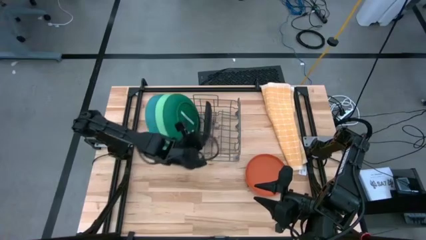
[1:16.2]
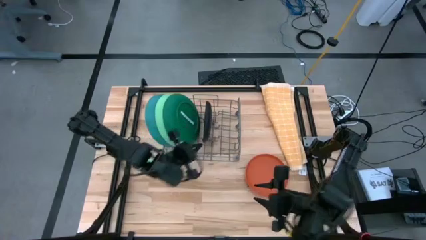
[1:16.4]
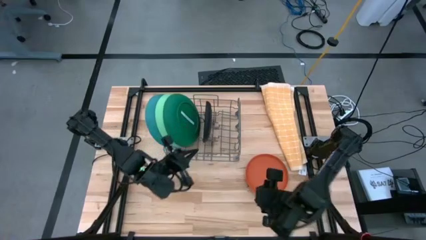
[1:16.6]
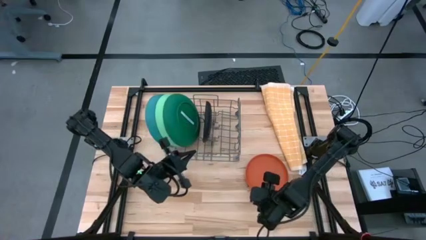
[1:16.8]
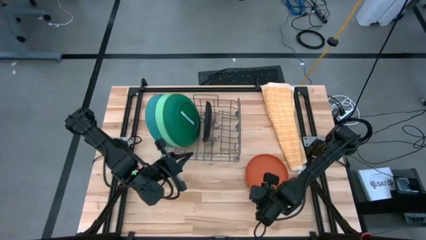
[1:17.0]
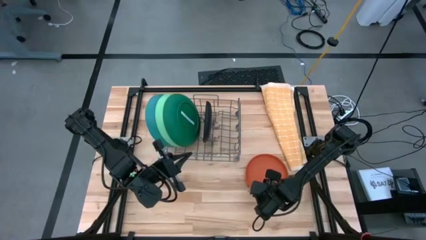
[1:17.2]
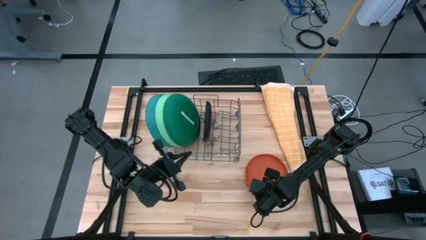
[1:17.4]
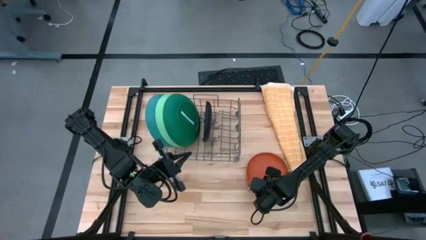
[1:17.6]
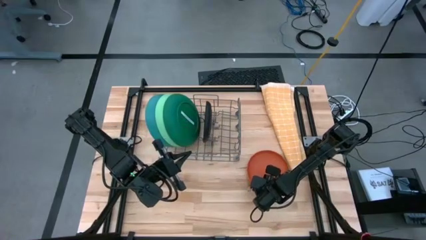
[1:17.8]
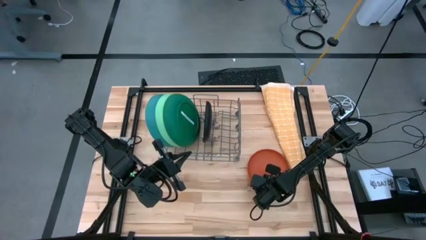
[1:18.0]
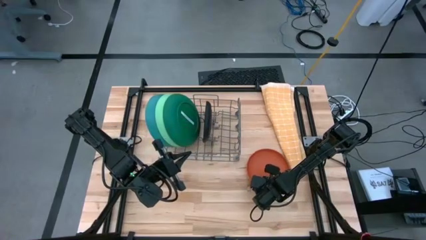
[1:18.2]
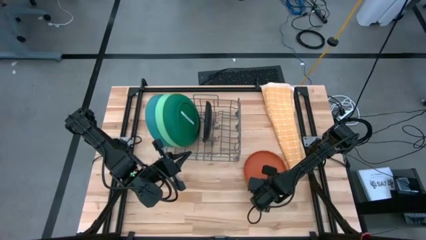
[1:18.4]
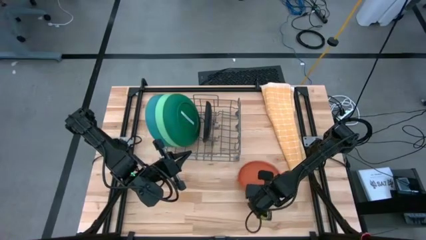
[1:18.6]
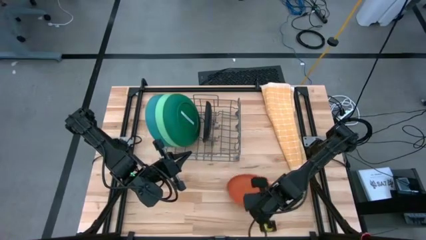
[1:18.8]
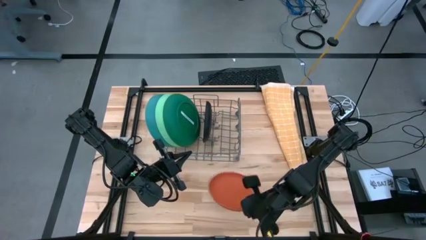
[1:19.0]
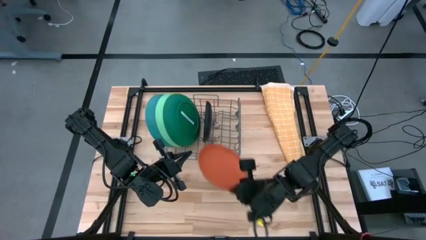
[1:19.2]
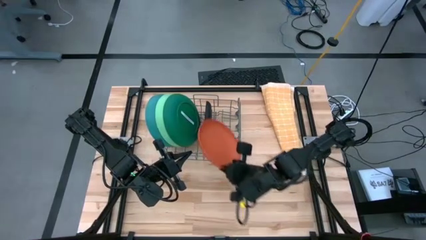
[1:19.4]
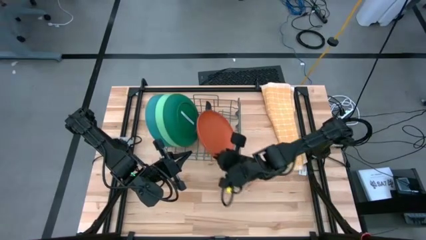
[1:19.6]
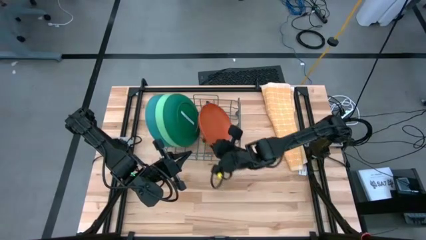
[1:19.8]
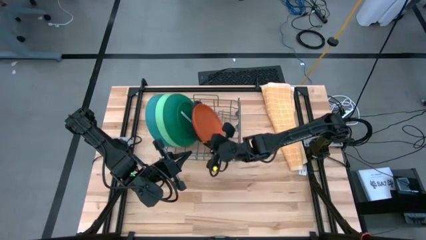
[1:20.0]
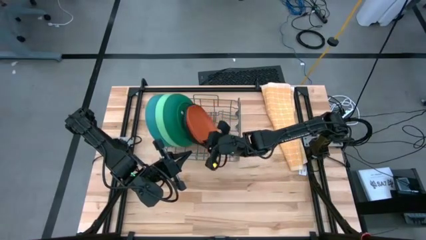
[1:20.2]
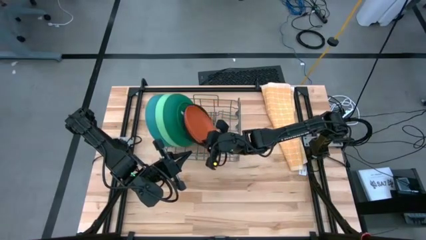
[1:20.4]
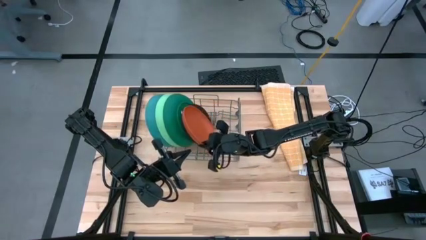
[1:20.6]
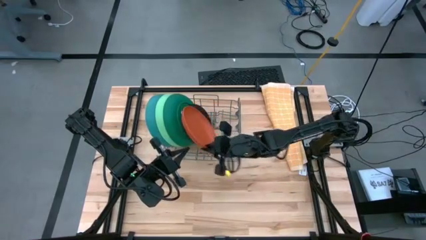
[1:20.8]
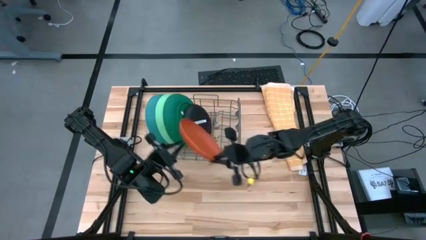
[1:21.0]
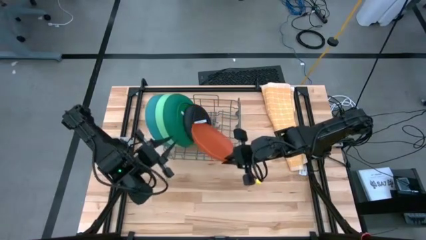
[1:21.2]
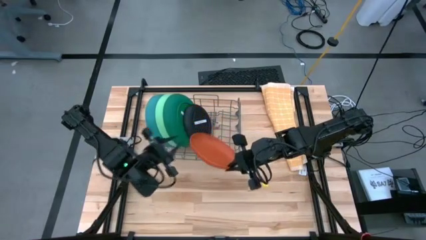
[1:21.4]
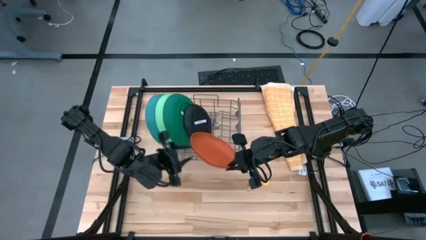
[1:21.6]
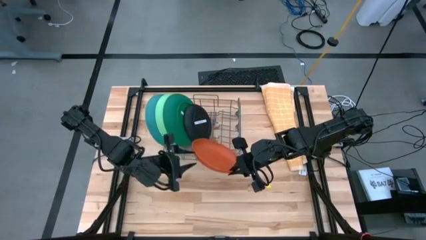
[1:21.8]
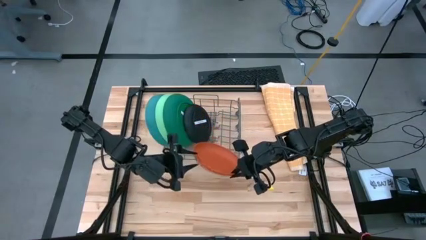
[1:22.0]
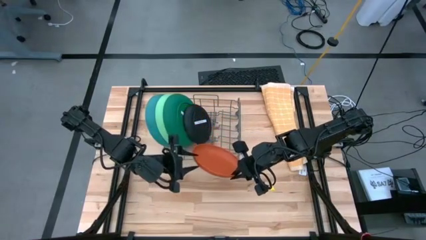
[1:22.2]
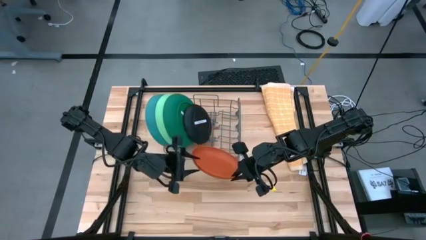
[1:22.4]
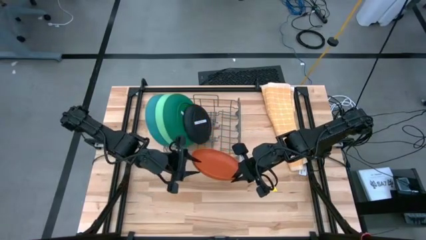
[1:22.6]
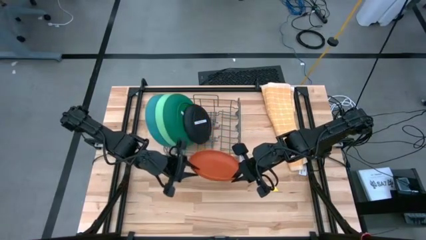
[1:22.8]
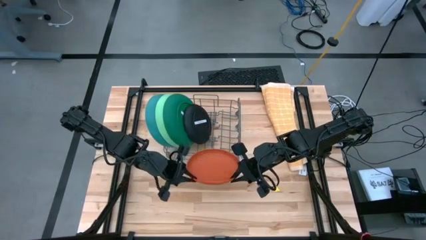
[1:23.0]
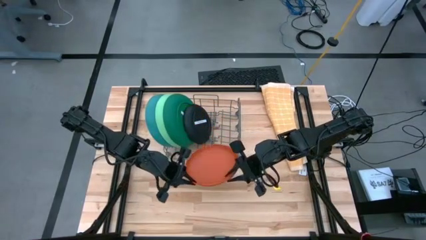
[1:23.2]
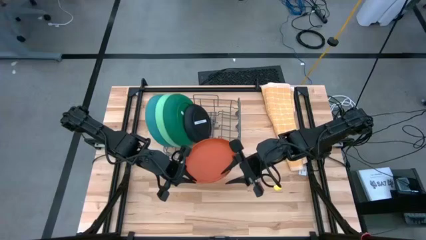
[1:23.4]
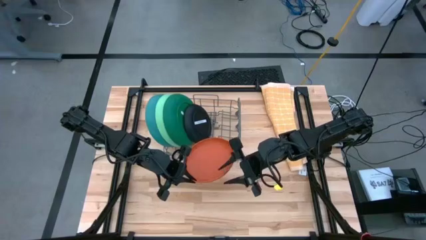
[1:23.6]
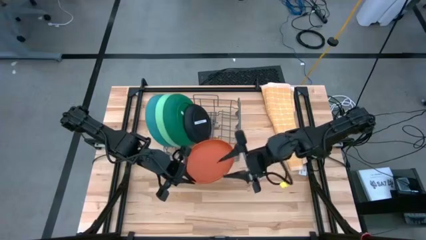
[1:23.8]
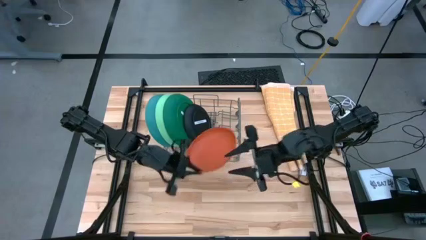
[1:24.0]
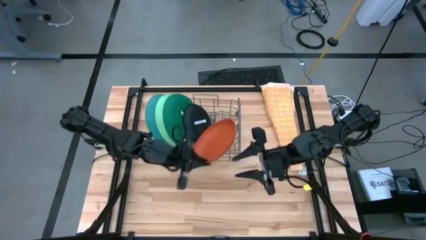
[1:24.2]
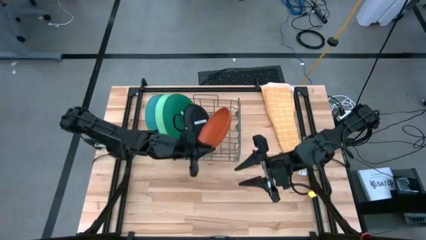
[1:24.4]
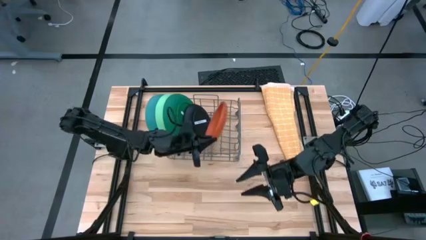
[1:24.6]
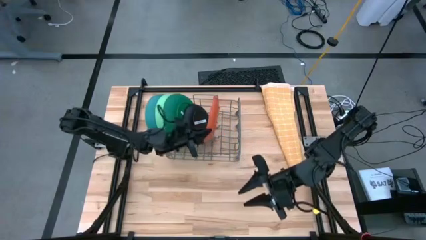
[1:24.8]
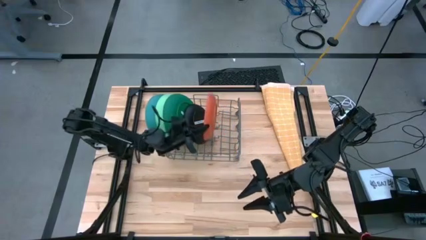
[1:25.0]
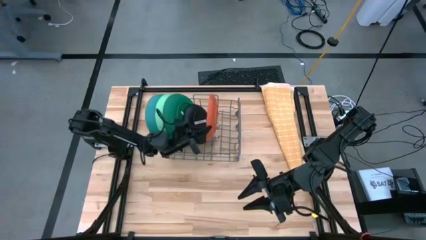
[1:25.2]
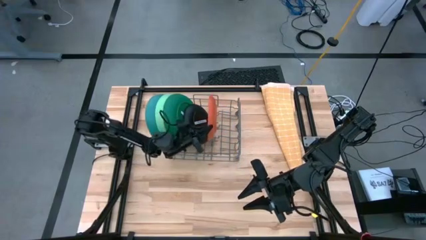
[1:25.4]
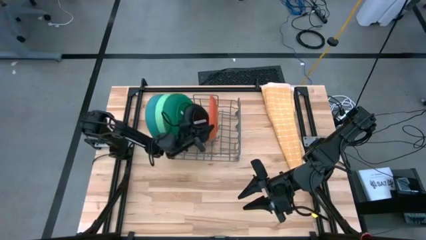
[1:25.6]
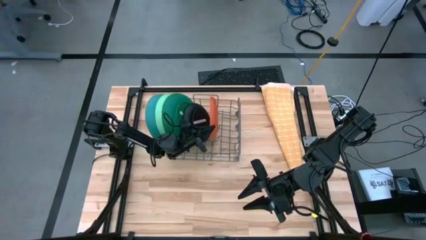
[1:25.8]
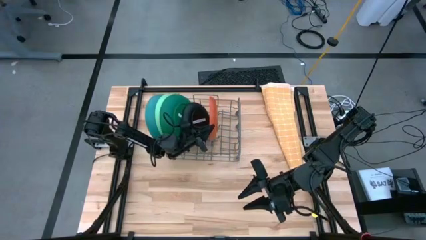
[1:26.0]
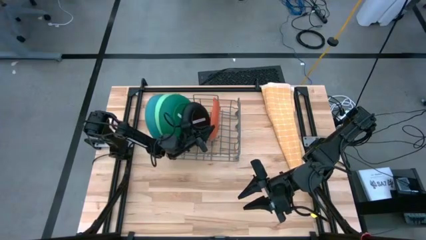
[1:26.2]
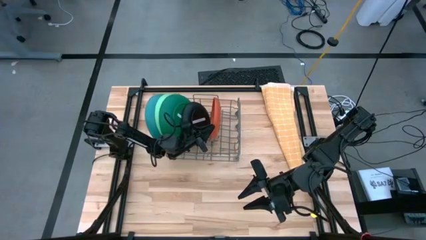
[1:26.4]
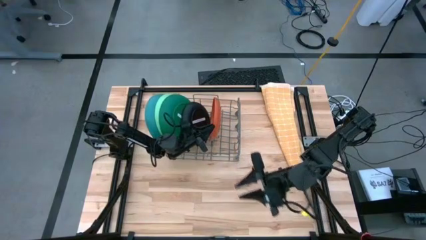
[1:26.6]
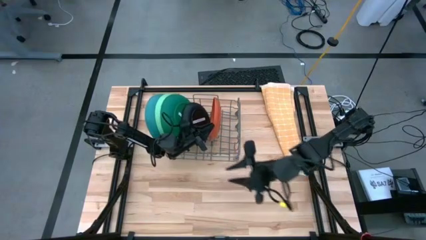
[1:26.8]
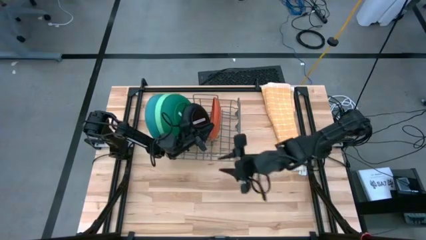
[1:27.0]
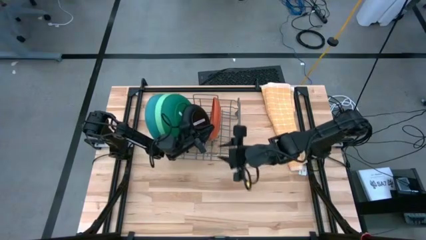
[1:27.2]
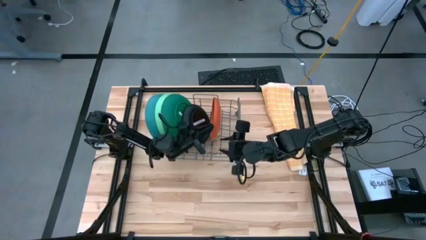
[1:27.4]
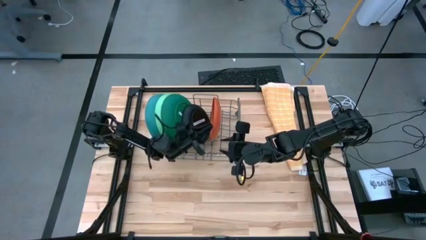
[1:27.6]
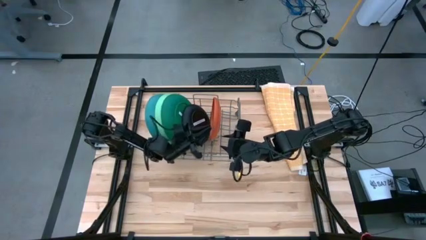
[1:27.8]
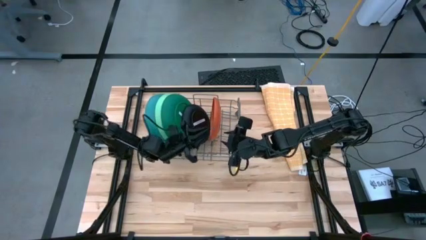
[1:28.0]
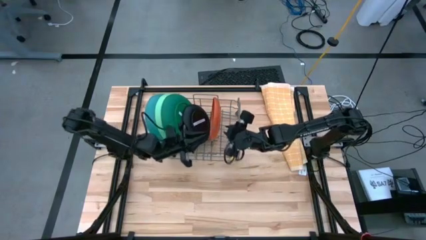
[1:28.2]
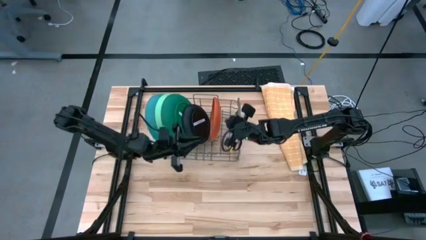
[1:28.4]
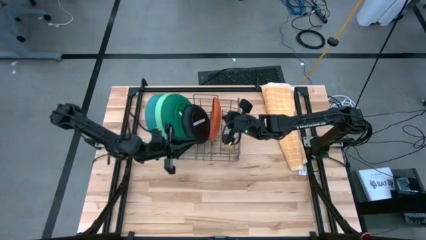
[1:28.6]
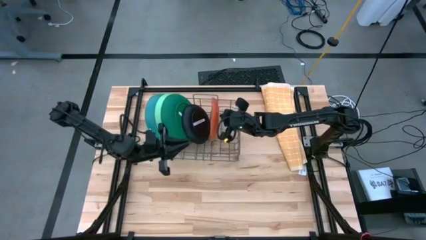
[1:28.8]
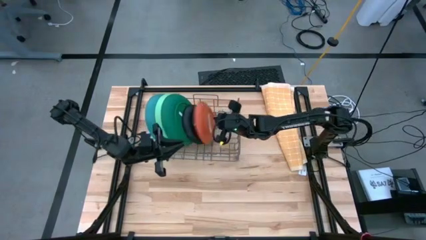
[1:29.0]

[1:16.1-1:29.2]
Task: Sort dishes
Put the orange plate into the dishwasher rack

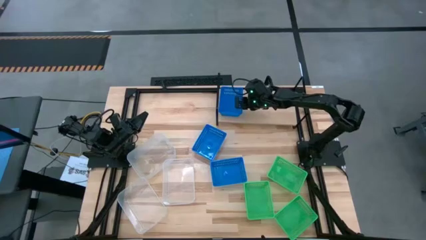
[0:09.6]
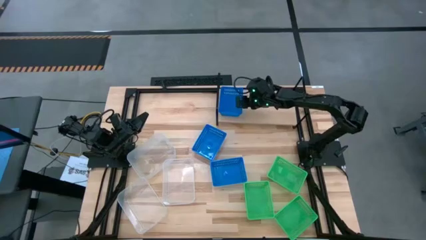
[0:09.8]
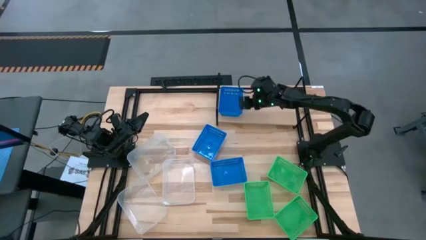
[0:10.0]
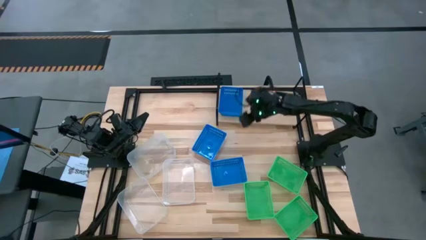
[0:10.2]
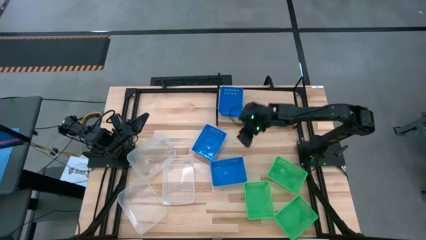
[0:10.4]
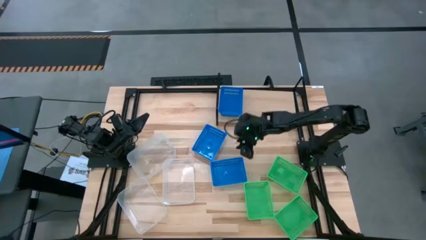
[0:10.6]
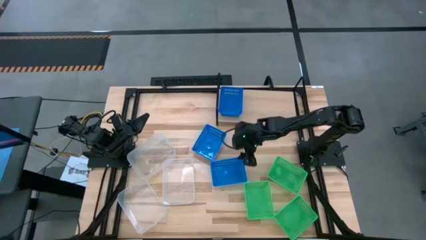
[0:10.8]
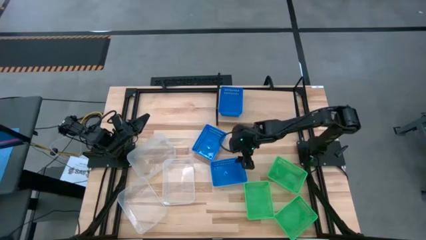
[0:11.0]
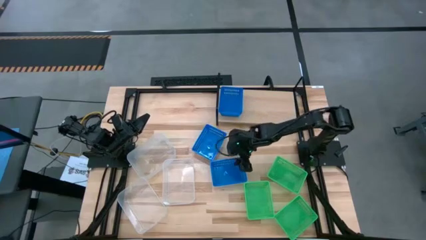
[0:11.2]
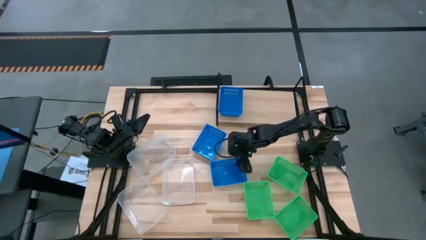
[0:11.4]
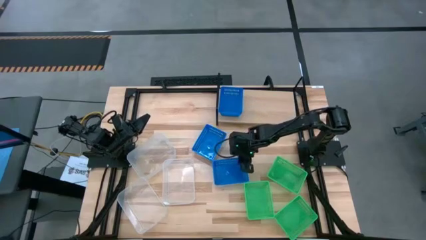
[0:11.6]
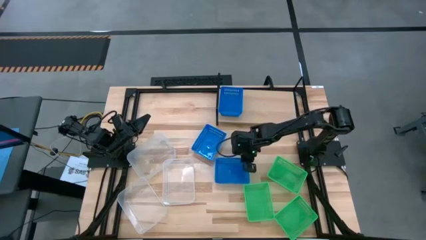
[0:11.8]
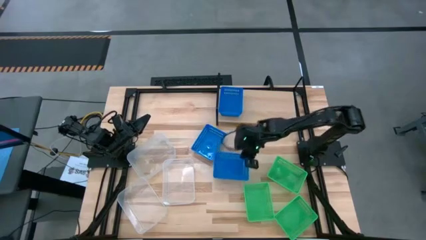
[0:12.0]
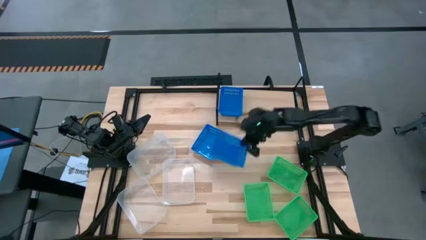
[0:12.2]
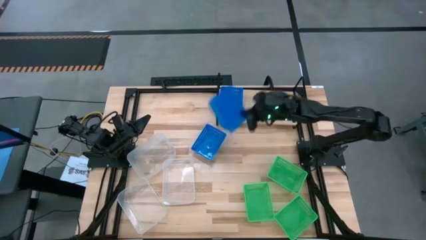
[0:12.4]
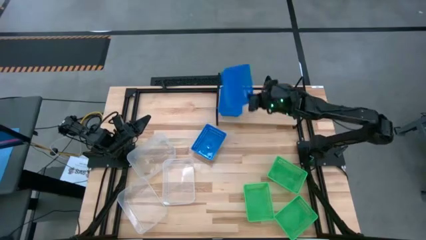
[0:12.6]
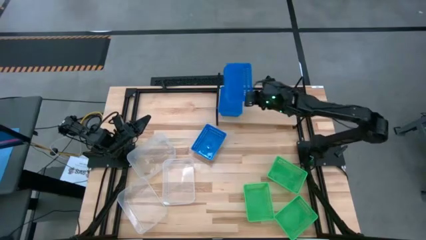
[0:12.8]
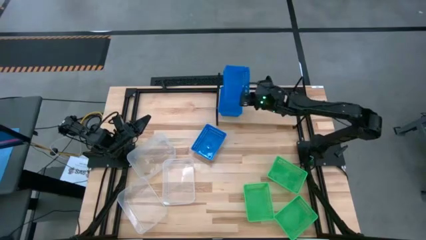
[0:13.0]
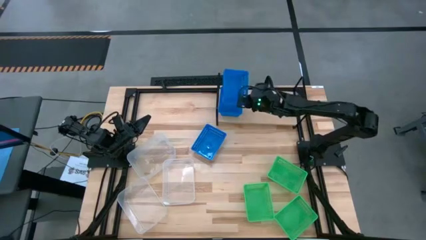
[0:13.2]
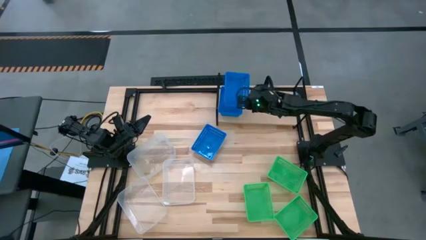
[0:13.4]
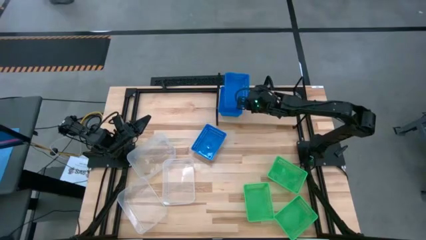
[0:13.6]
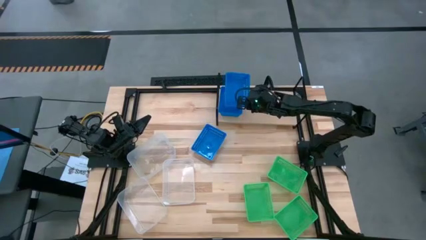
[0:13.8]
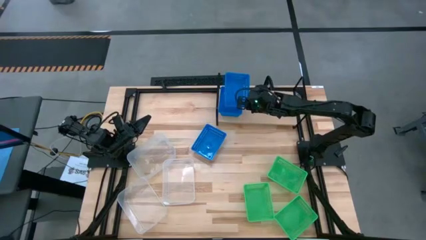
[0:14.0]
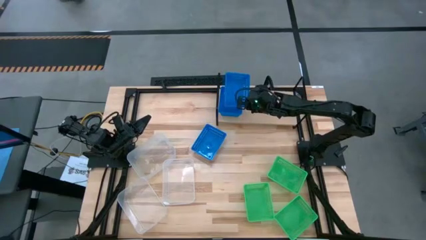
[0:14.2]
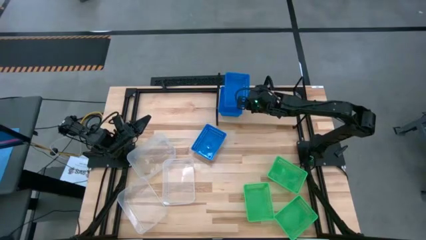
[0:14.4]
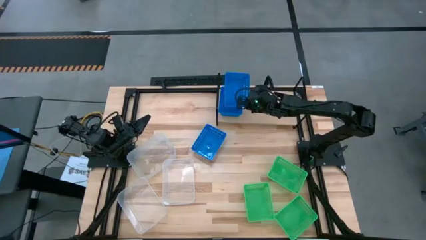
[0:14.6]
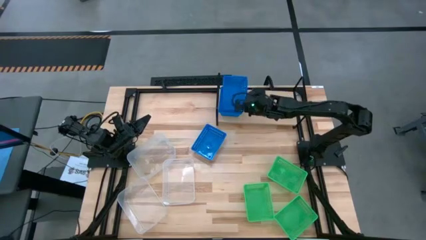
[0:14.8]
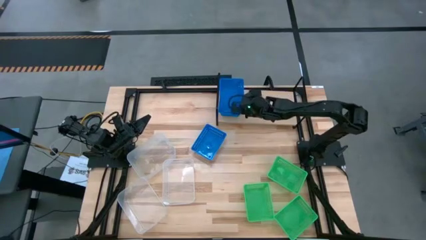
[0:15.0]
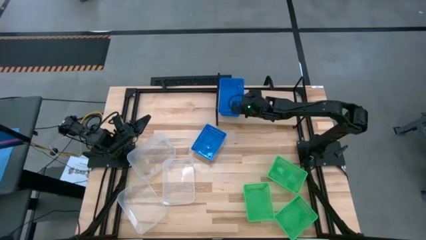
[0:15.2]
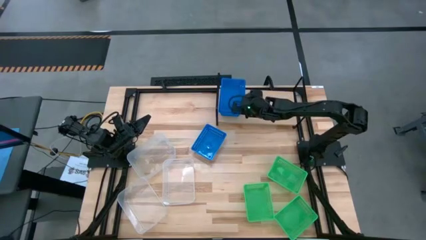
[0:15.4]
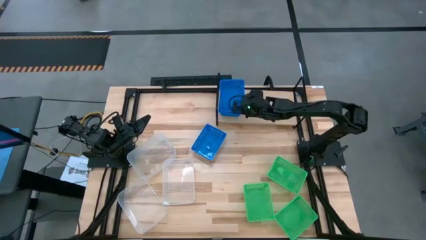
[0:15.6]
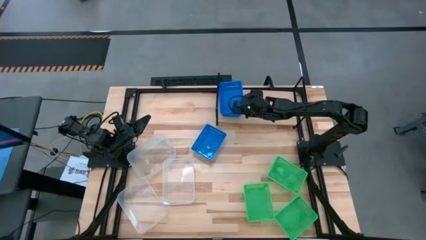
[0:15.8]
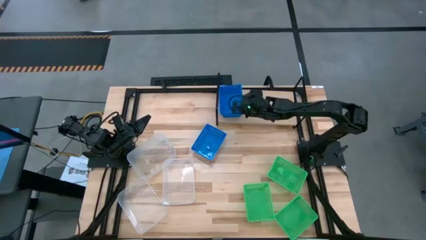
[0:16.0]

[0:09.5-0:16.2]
Task: Stack baskets on shelf by color
Stack the bottom blue bin on top of the blue bin on the shelf
